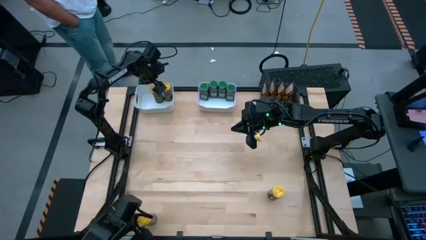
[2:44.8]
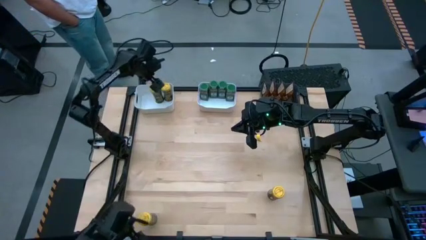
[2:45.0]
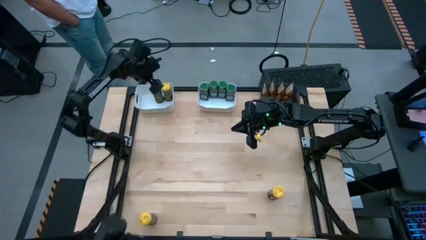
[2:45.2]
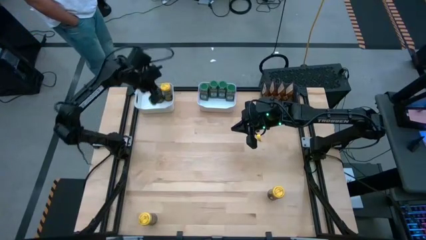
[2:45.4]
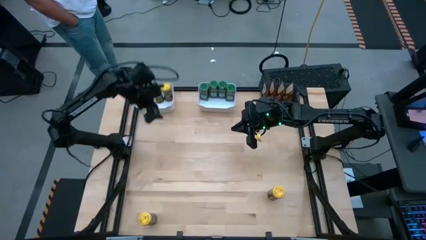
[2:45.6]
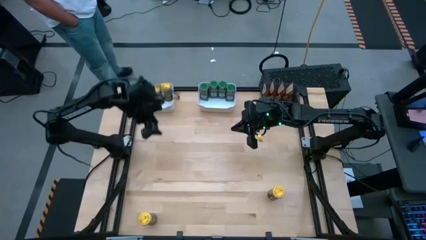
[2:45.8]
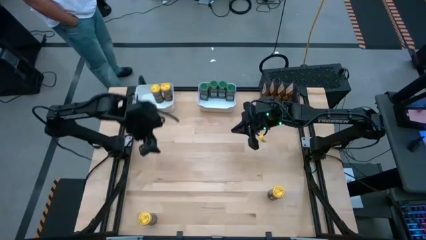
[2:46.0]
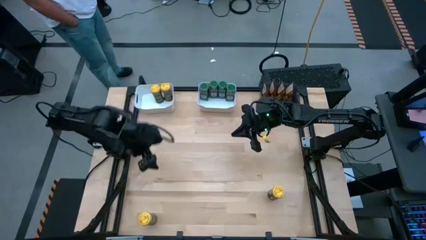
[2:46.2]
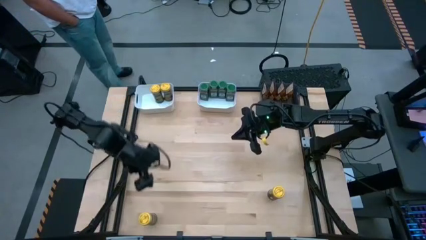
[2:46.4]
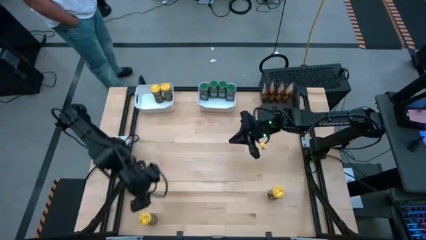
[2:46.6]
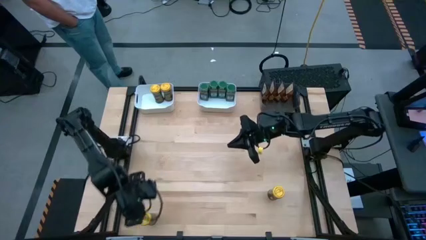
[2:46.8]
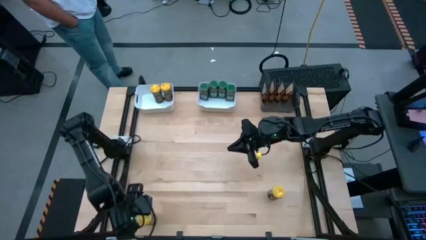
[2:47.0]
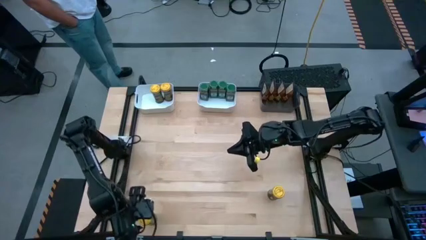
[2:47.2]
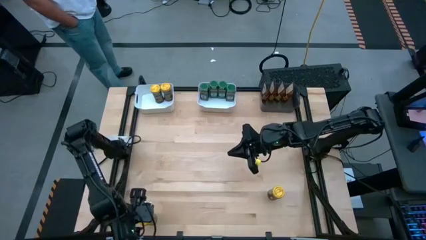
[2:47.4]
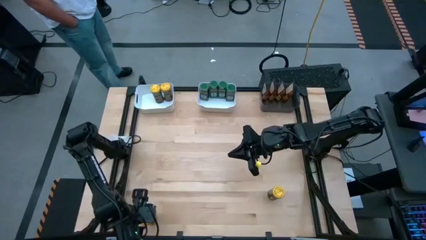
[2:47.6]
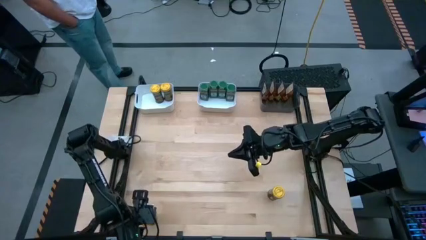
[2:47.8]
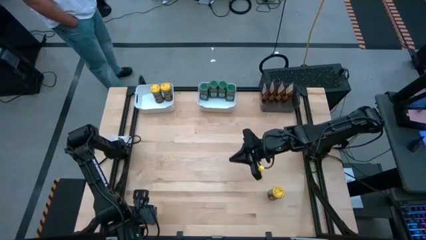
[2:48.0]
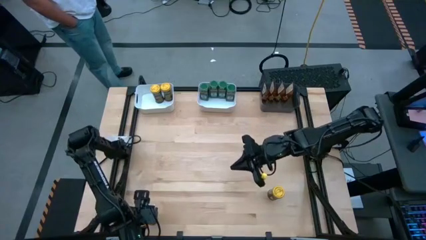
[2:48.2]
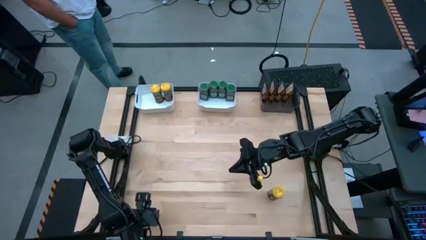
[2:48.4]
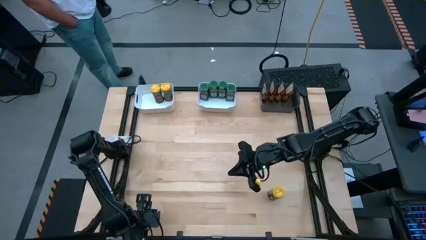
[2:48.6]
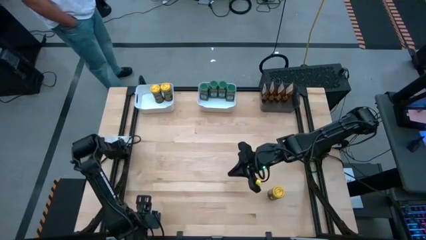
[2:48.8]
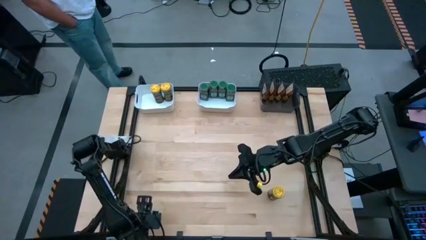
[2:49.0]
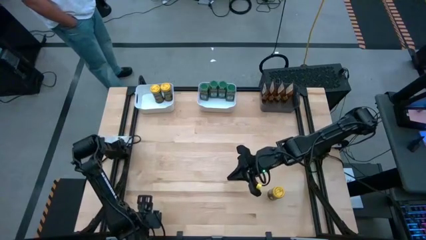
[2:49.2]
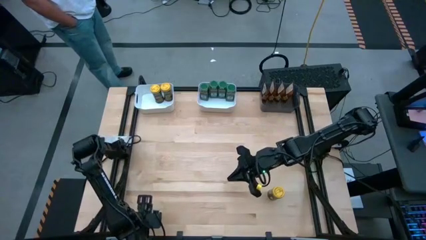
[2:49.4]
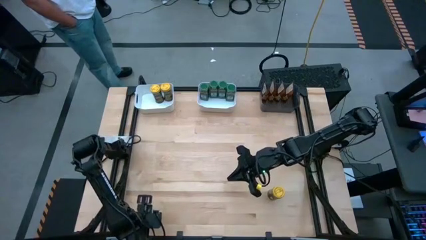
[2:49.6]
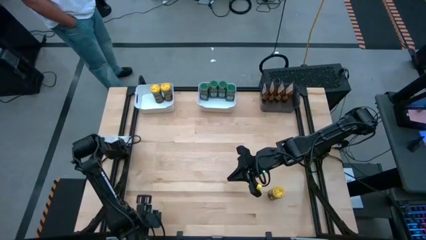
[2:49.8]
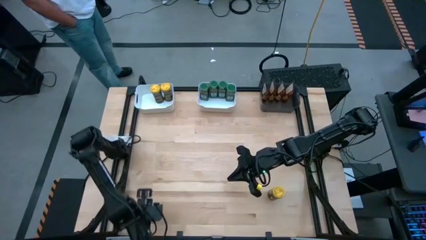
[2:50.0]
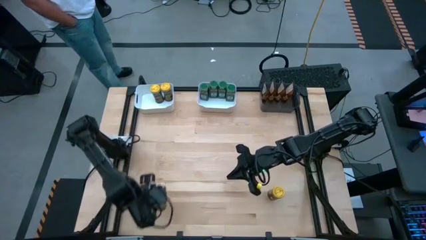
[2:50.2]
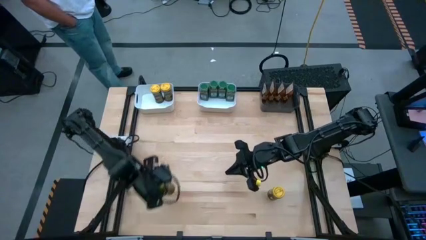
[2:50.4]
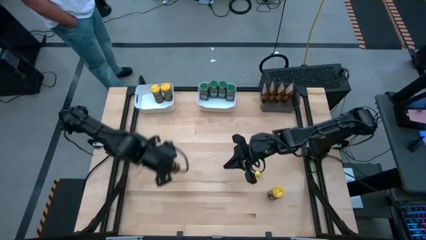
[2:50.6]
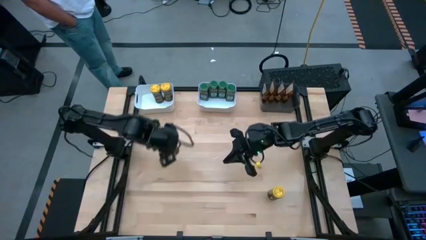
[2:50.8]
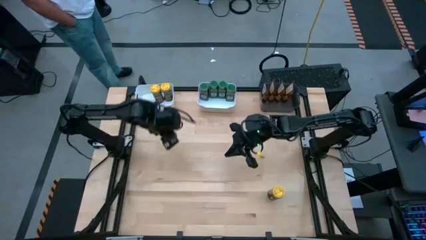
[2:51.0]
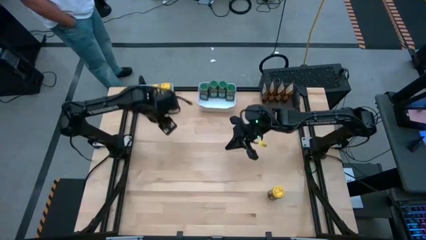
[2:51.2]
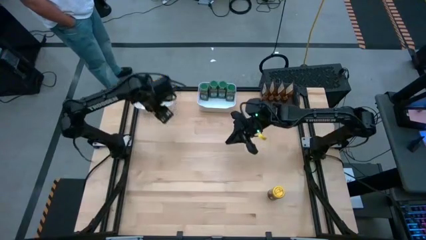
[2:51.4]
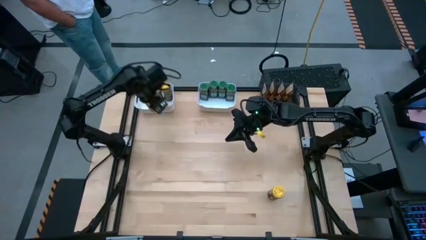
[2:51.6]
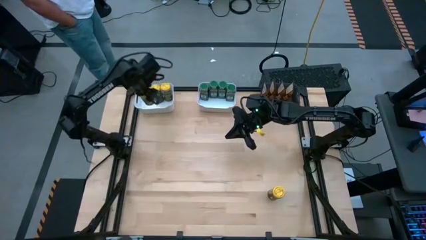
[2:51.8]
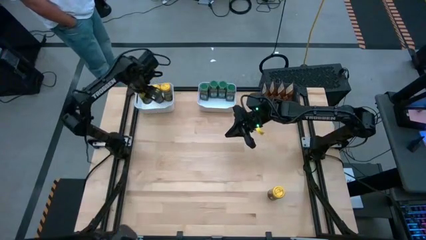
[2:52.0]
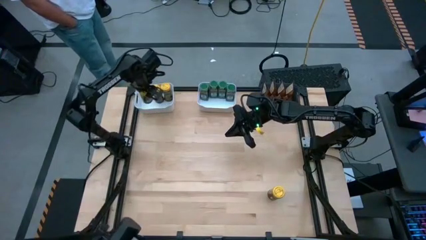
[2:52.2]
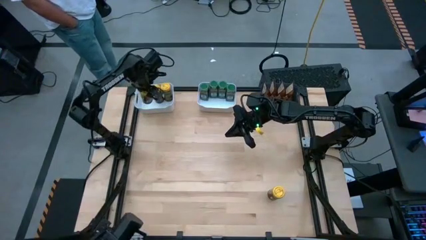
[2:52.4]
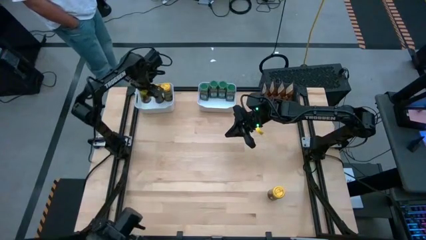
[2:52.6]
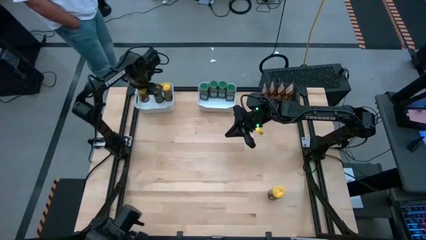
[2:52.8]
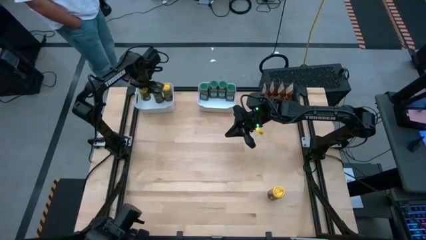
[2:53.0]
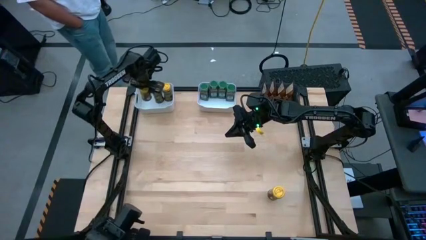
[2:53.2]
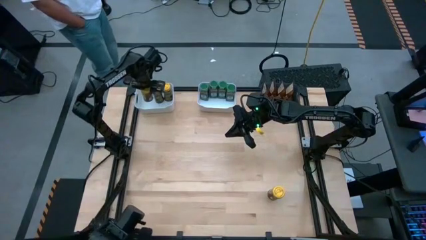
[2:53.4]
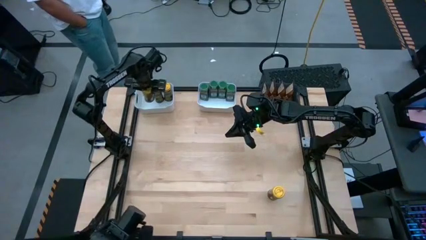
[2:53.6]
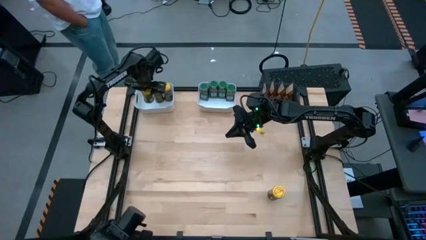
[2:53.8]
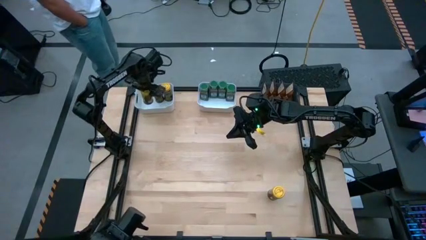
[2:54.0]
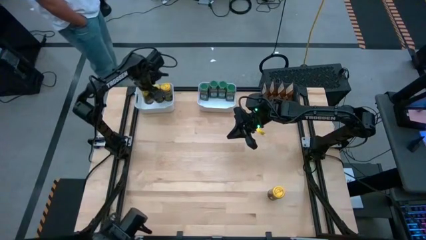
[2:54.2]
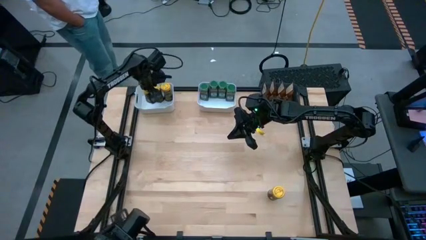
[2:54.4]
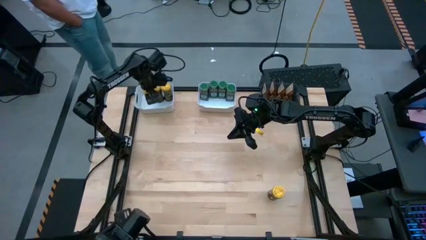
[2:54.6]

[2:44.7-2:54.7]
Task: Sort spices by type
Put the left yellow seasoning bottle into the left white bin

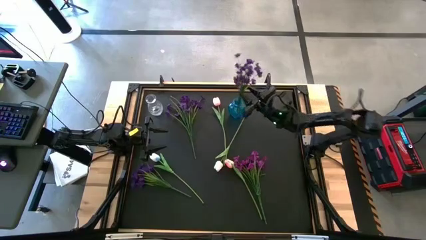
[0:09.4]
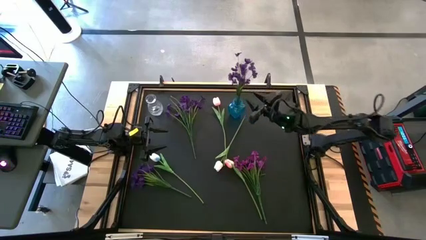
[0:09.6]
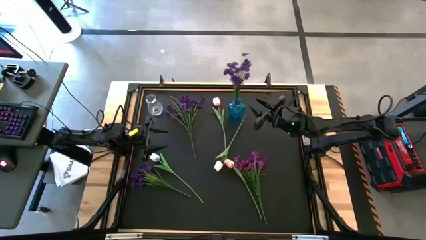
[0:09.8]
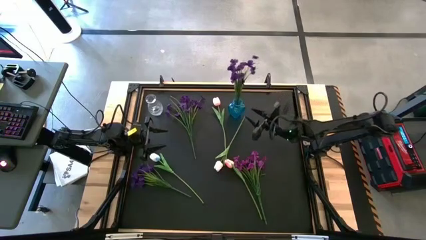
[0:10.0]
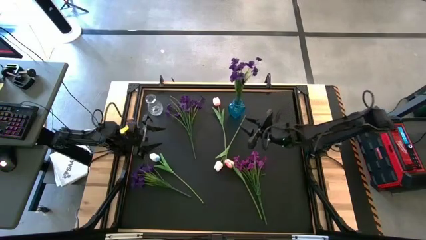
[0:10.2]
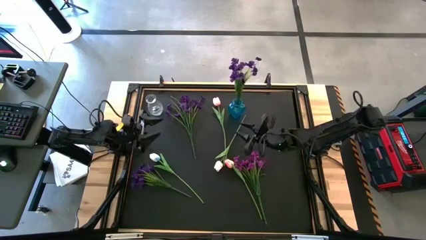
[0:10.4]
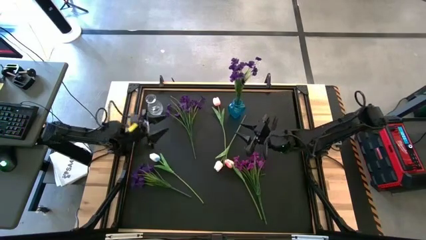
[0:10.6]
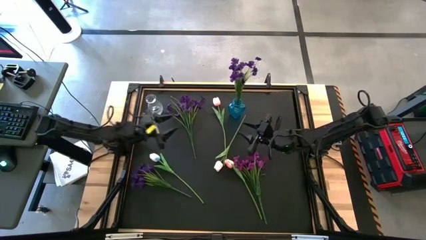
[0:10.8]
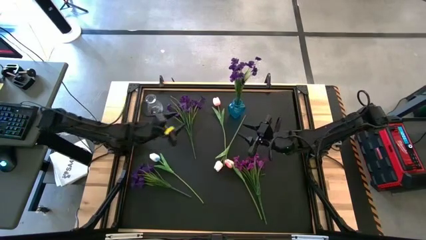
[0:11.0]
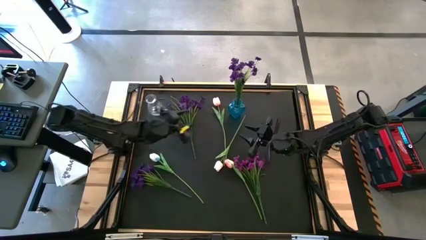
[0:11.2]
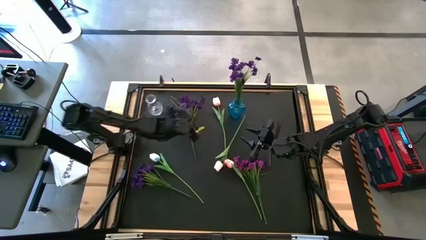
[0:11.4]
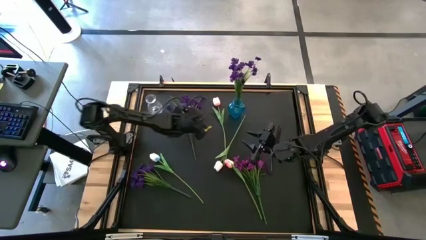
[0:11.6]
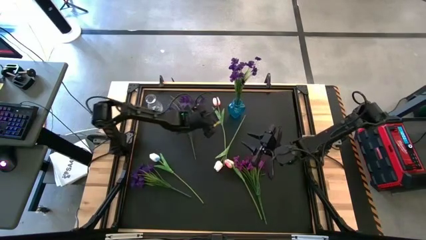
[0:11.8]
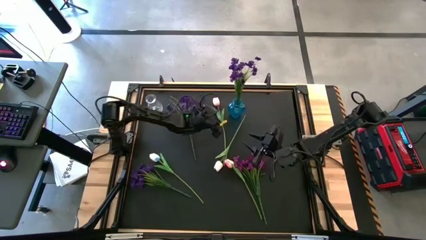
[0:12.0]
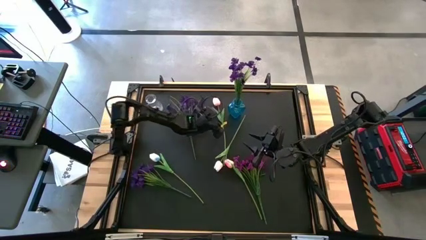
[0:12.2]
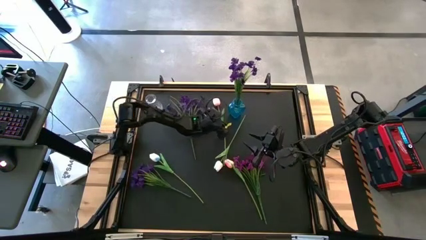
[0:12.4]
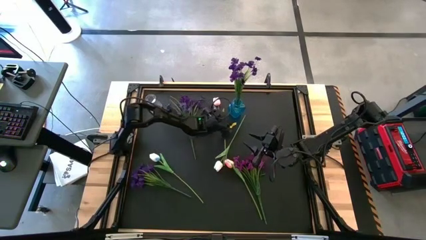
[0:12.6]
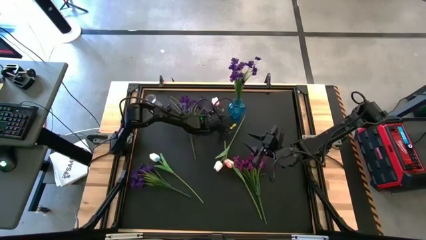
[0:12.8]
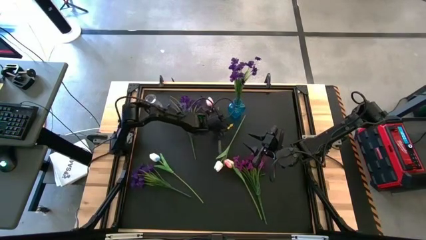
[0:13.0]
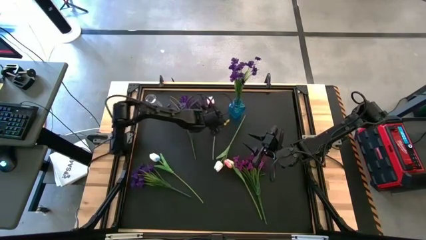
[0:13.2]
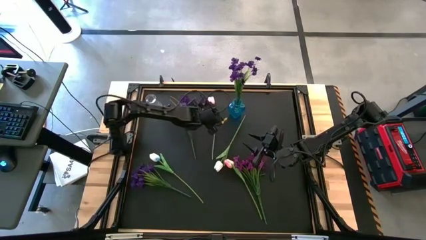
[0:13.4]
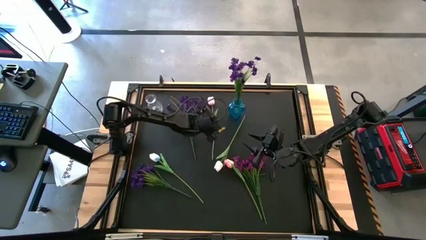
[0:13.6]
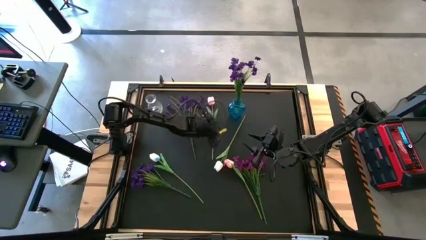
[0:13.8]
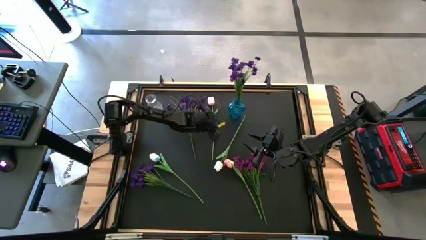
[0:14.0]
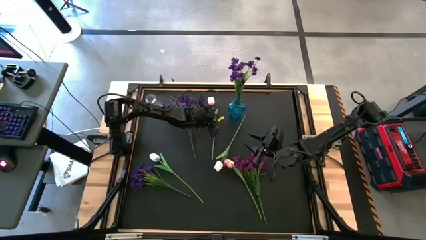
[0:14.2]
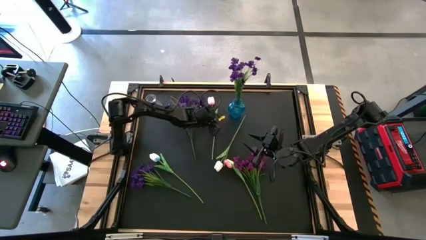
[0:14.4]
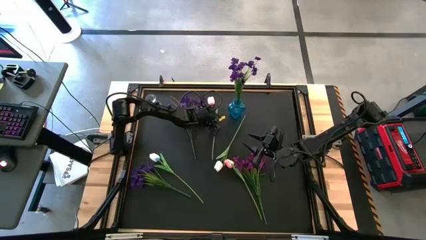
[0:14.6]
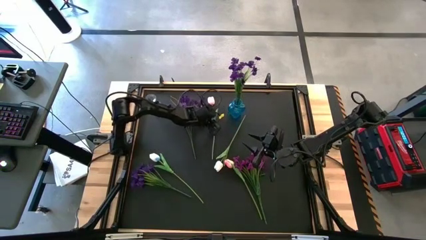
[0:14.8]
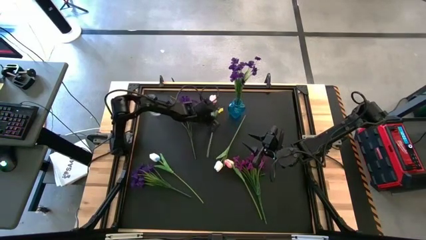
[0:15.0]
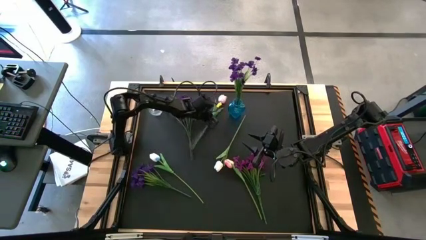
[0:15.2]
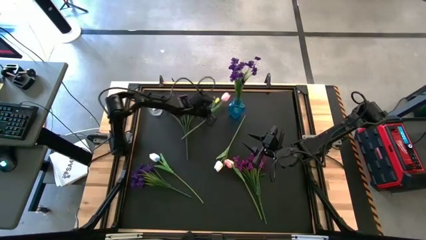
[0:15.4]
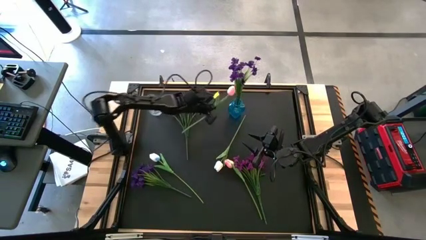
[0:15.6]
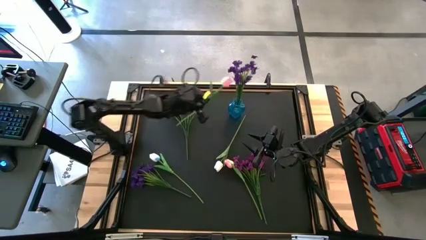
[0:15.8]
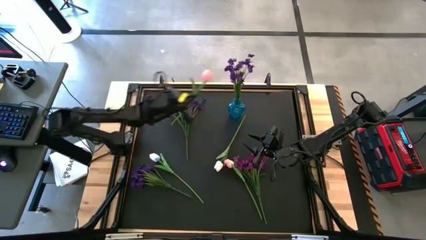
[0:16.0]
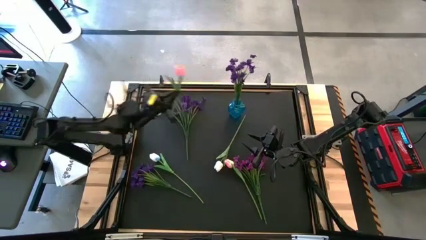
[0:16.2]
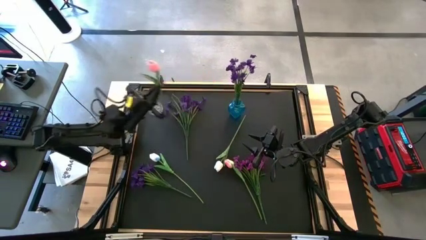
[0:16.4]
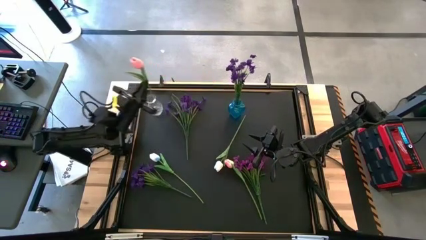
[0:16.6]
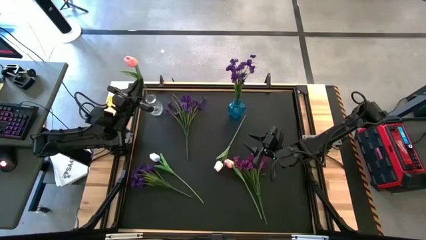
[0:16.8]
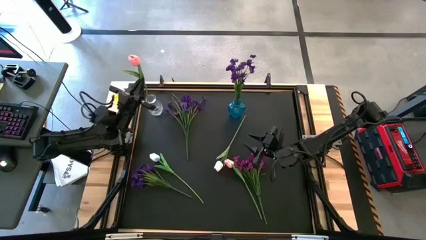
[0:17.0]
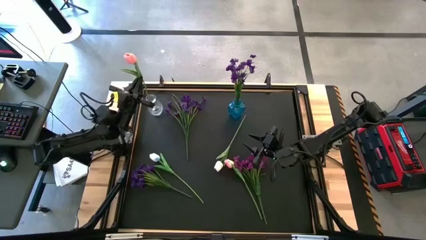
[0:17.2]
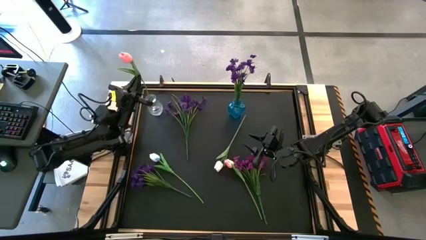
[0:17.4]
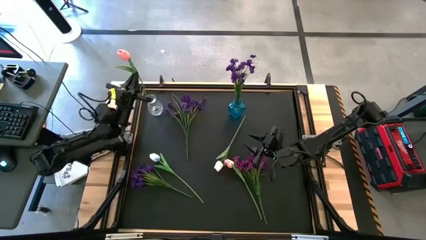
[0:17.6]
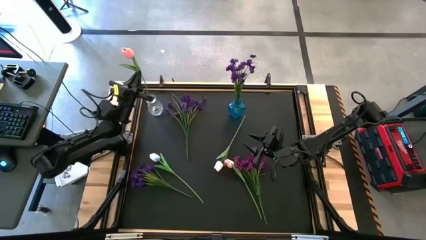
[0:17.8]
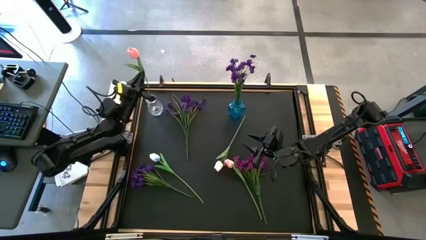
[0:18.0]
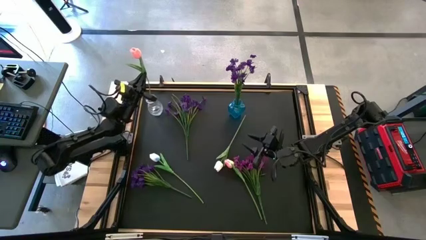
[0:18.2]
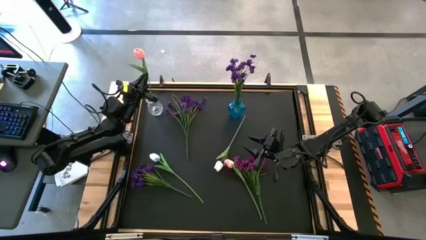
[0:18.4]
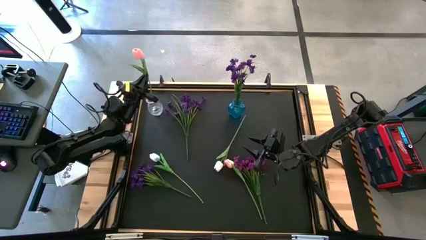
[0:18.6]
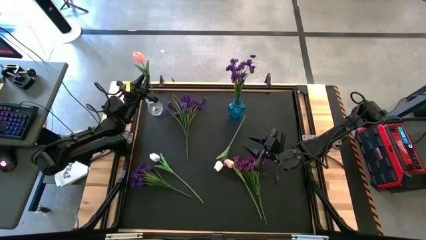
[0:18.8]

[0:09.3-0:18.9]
Task: Sort flowers into vase by color
Put the top pink tulip into the transparent vase
